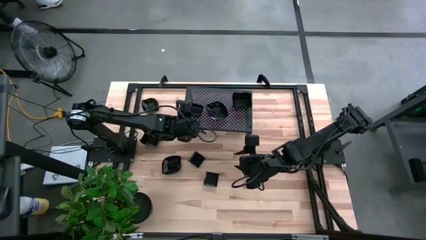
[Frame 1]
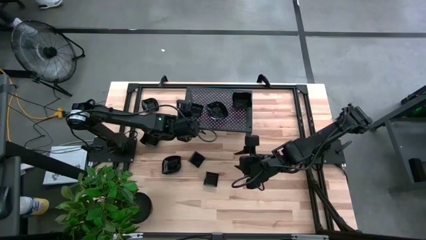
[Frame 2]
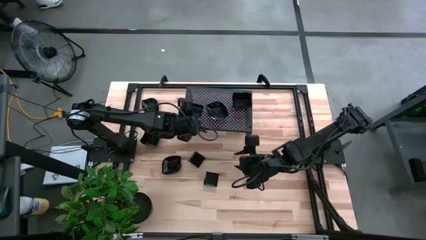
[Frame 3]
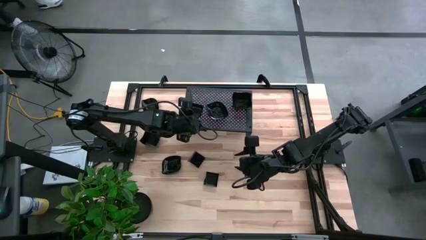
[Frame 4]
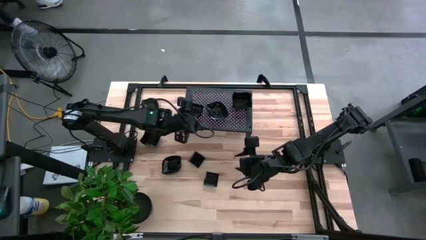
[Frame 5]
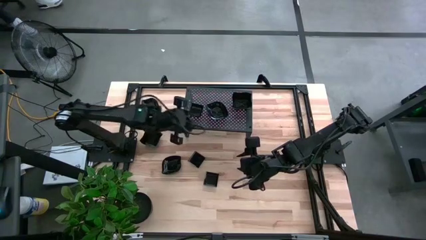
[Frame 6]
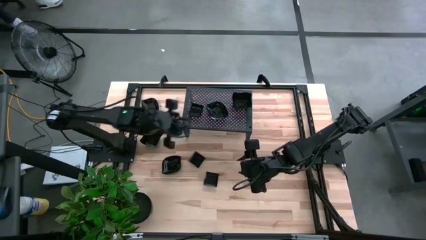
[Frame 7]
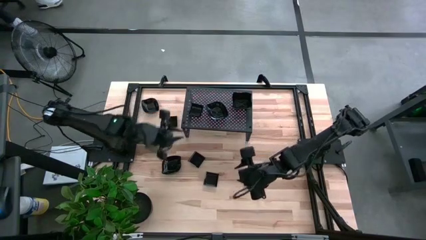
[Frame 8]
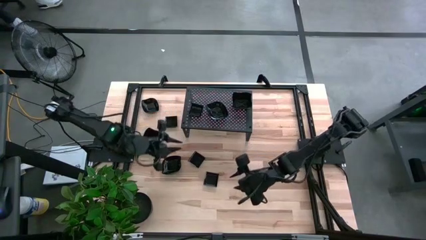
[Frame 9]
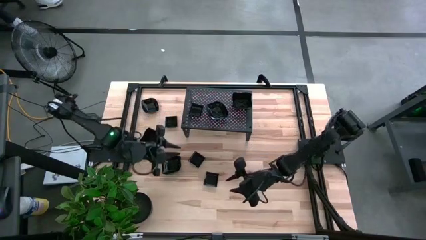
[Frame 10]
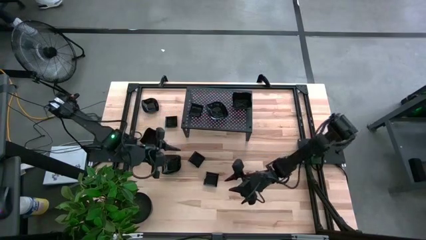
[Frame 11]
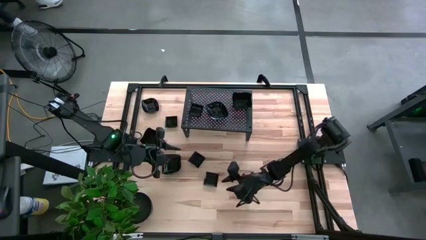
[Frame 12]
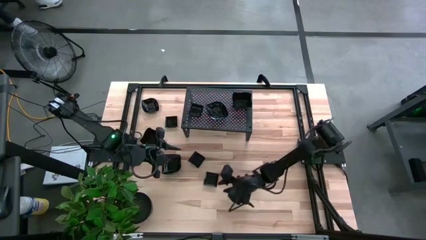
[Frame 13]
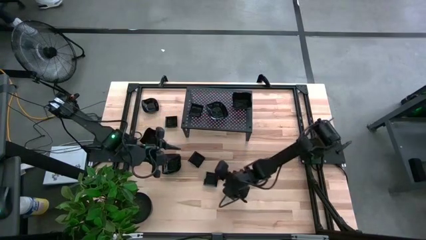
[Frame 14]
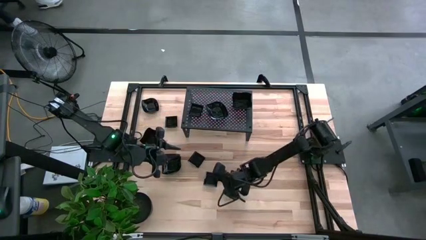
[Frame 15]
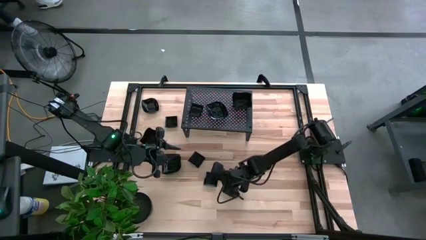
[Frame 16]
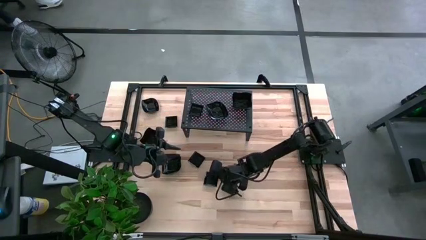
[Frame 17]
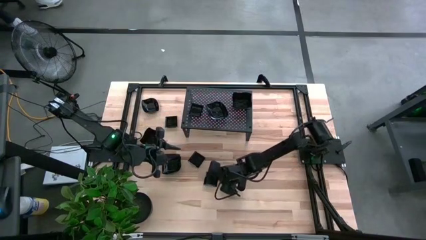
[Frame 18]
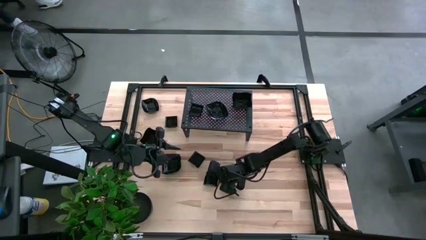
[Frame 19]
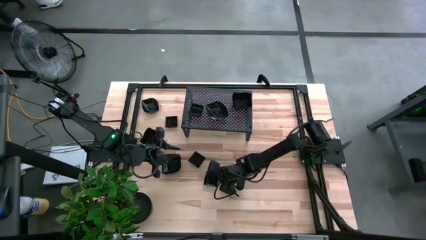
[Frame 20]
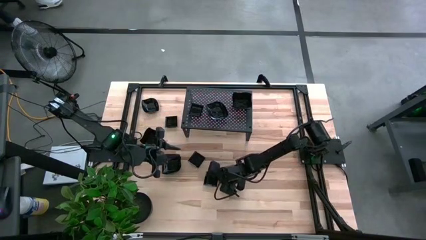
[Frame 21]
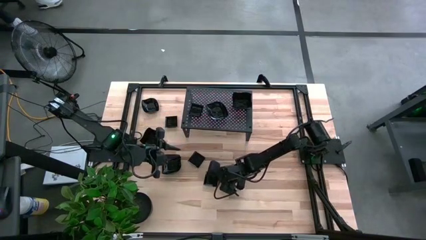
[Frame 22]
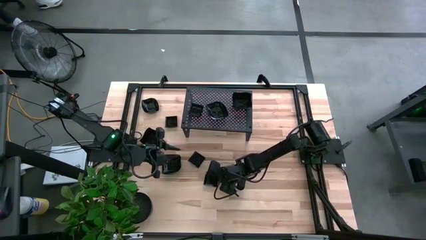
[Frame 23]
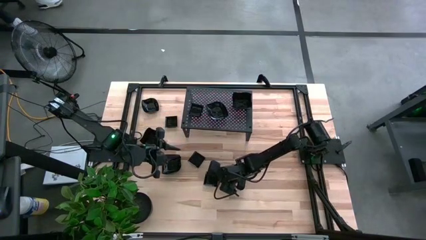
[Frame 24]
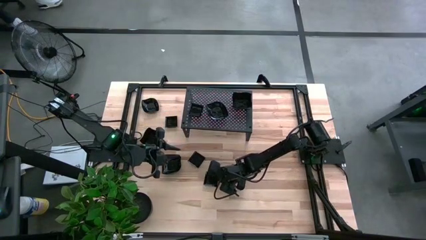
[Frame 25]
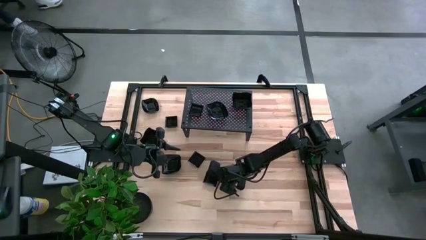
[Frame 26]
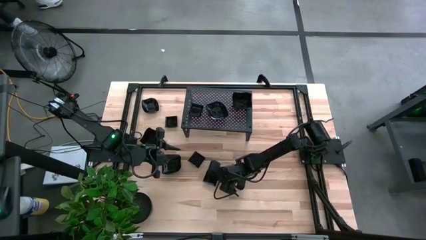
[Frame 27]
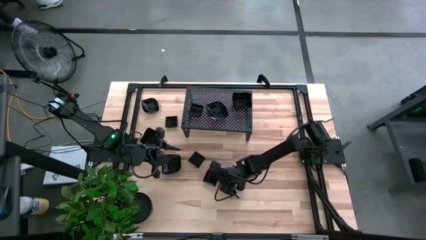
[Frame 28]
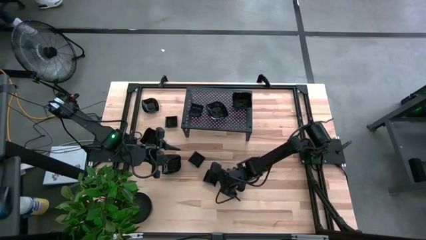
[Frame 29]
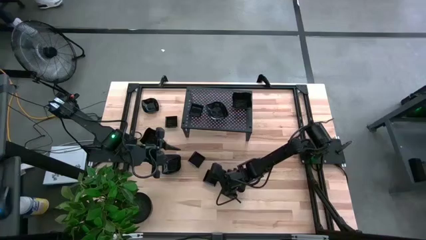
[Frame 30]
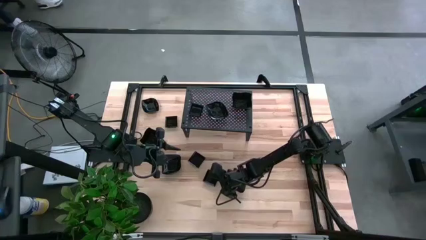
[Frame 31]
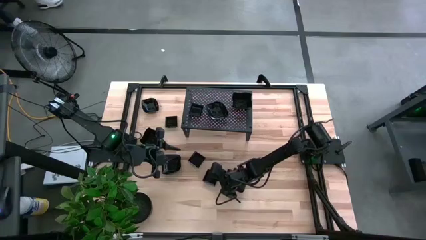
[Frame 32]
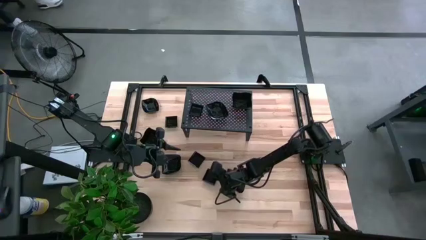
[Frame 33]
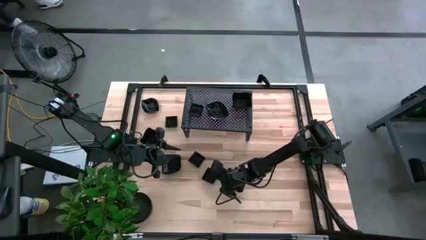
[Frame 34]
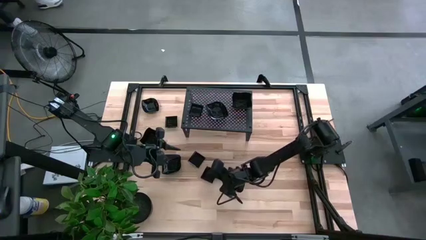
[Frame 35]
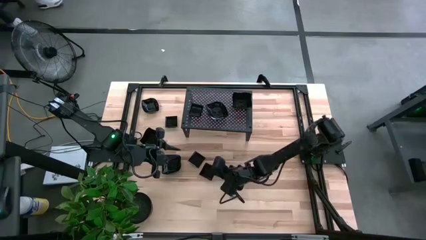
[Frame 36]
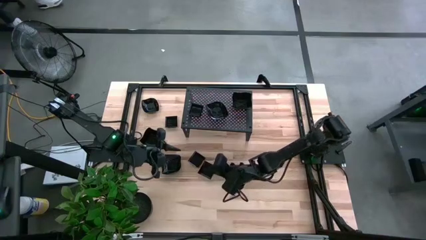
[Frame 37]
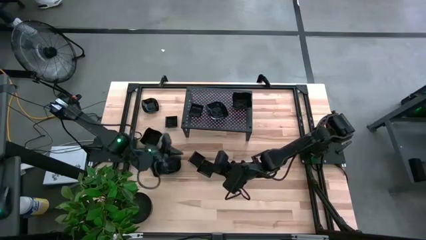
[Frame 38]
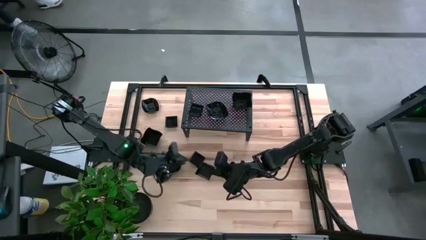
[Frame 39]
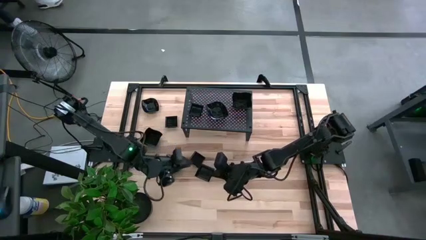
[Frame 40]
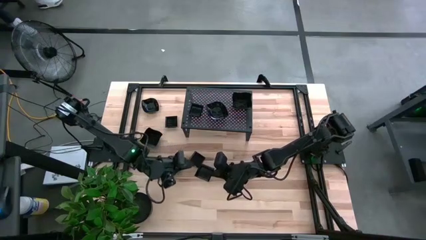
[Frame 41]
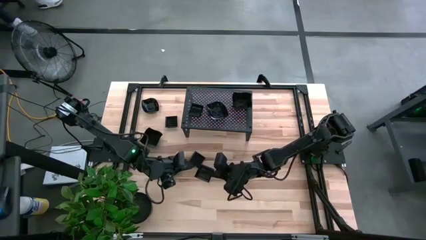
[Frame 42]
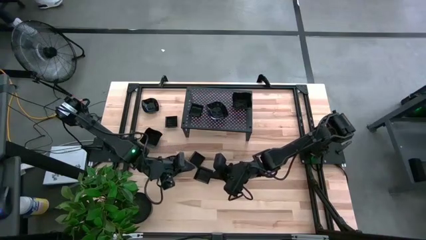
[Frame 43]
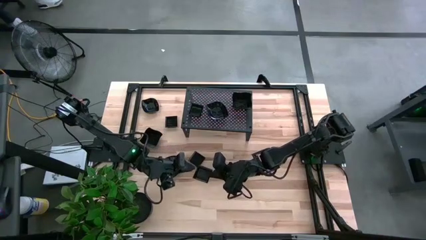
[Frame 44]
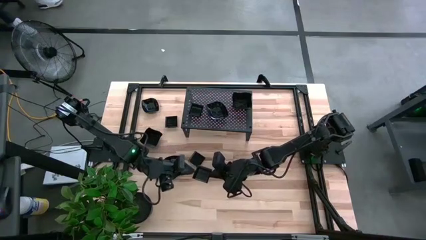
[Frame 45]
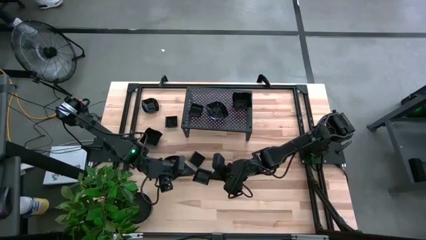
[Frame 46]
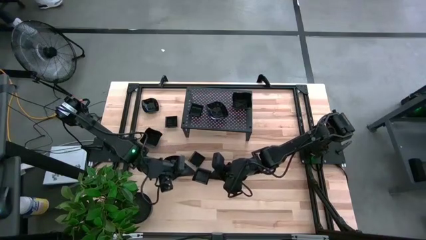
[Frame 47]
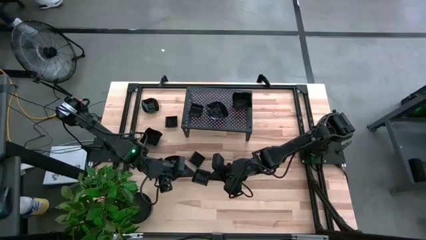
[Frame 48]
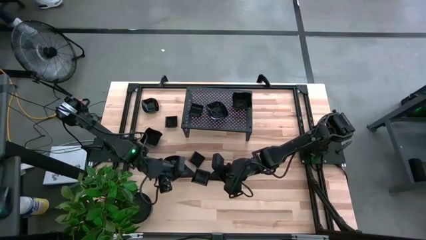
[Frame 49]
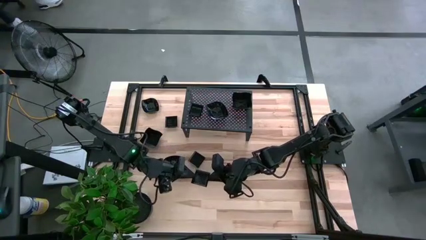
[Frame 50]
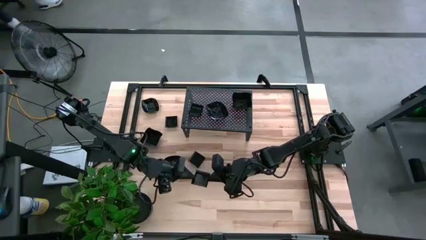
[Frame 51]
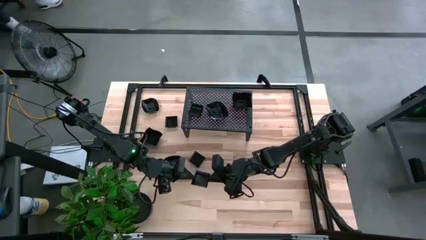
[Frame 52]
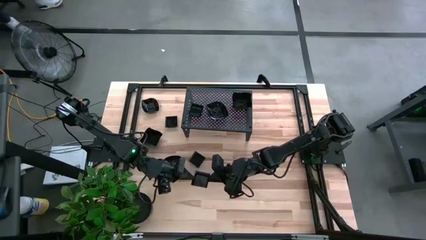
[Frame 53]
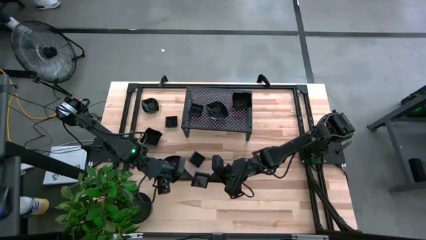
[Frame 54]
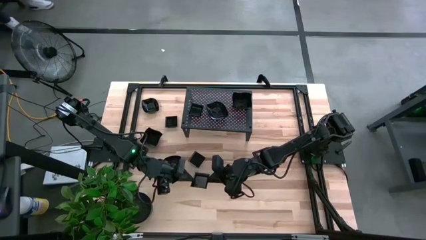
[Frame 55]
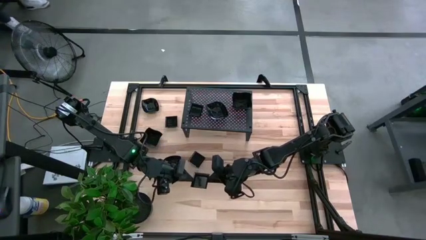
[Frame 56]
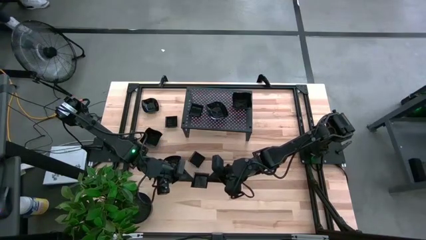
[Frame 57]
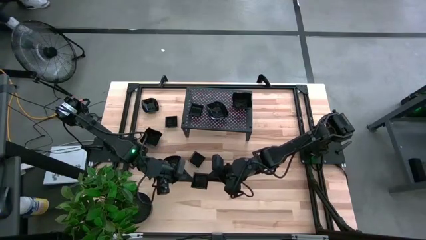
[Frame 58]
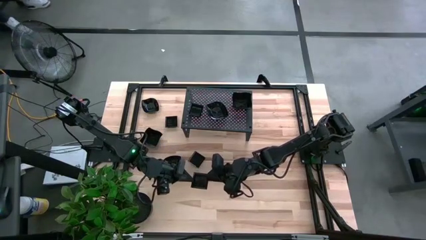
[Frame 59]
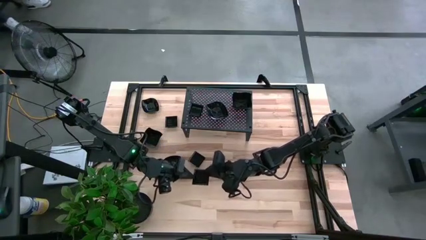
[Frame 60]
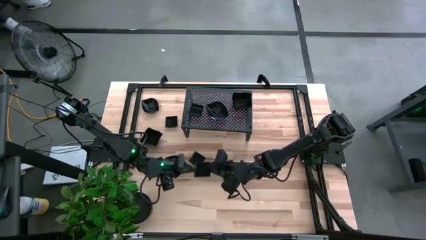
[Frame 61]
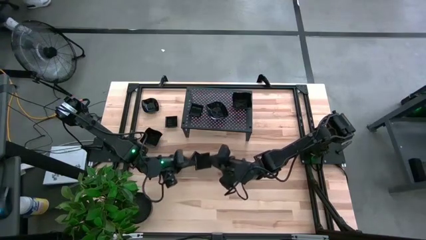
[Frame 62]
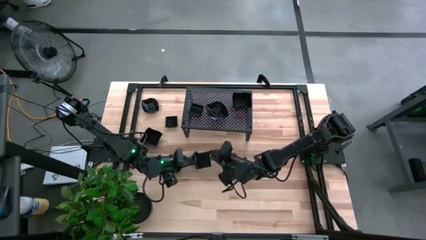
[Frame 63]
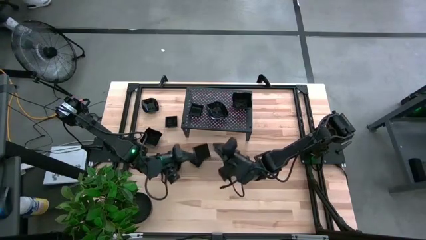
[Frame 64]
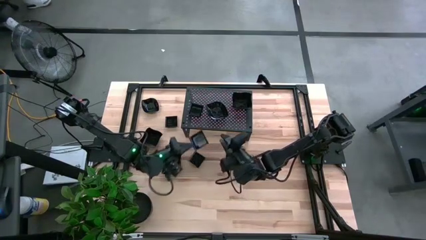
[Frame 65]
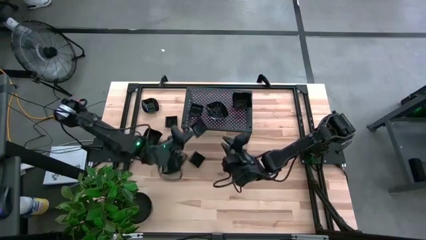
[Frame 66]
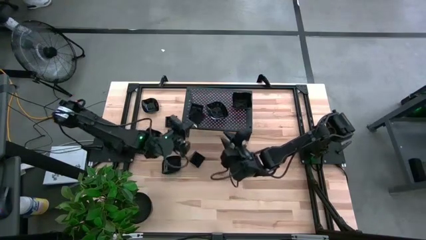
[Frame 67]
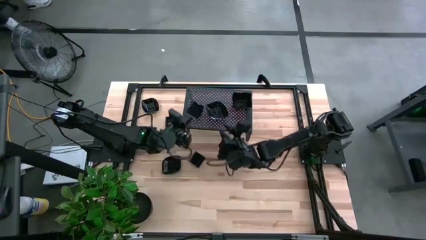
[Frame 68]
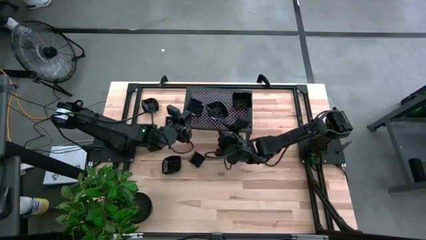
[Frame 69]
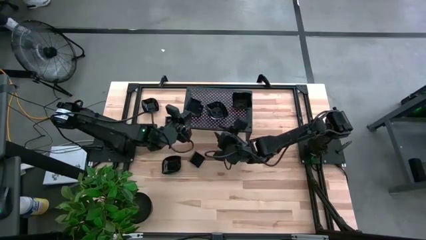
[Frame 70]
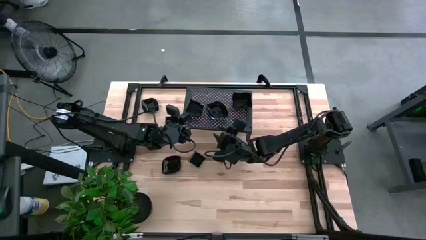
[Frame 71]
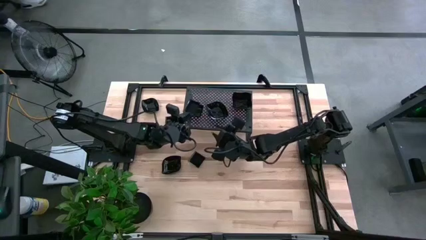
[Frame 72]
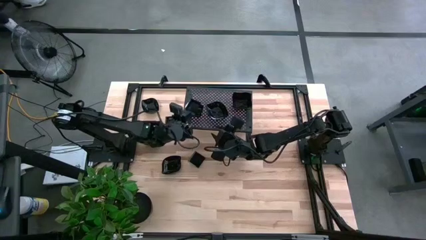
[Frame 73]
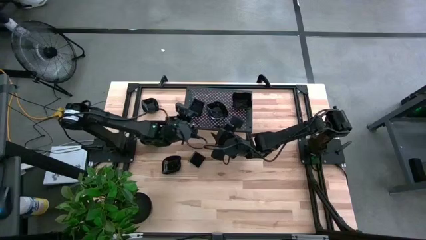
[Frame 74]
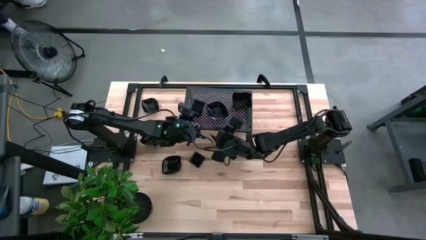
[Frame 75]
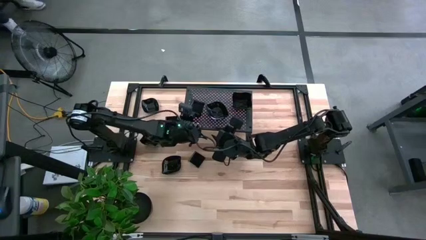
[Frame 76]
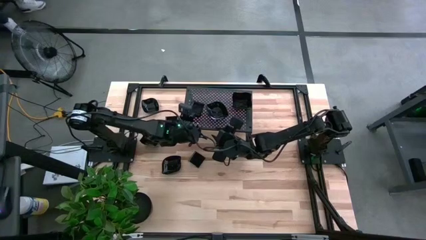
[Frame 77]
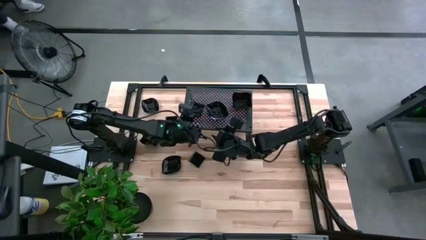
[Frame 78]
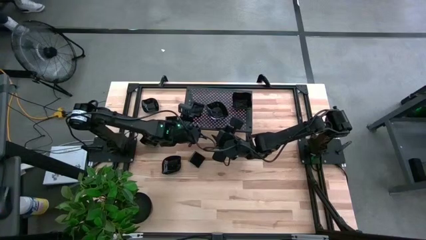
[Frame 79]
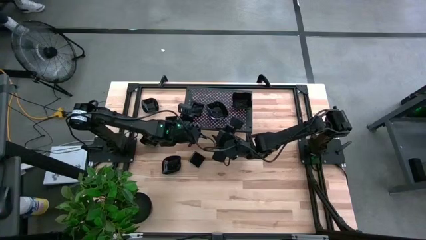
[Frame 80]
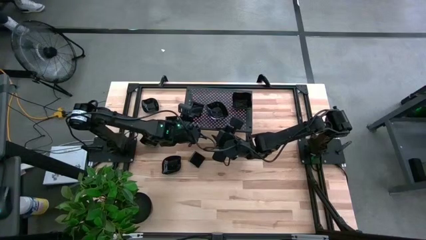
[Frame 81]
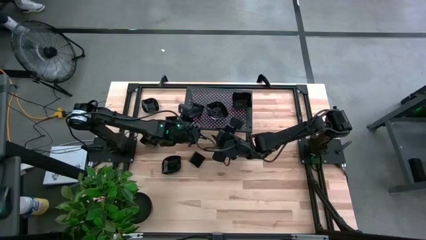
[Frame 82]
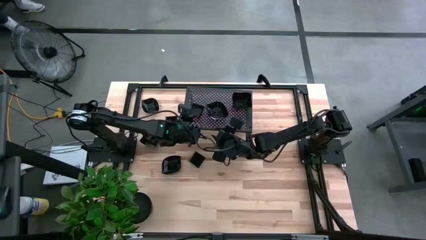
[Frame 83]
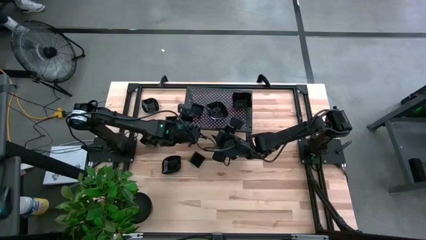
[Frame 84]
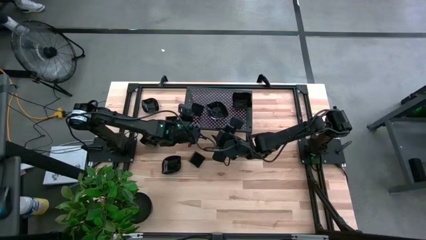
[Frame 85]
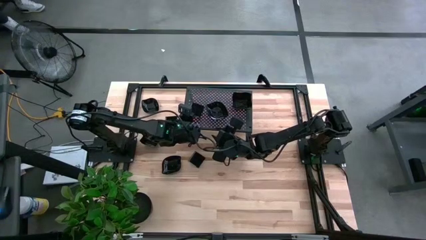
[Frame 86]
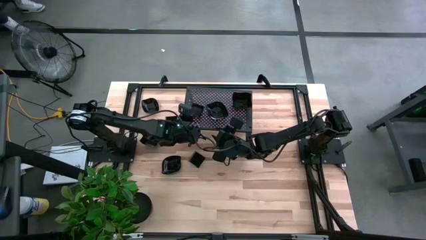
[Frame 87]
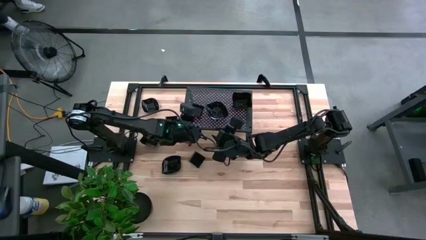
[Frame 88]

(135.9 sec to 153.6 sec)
Task: Pick & Place Mini shaped plates
Stack the square plate on the square plates on the shelf
